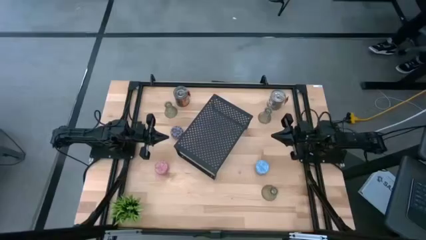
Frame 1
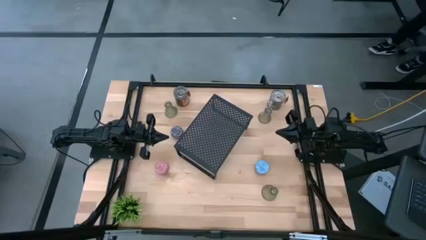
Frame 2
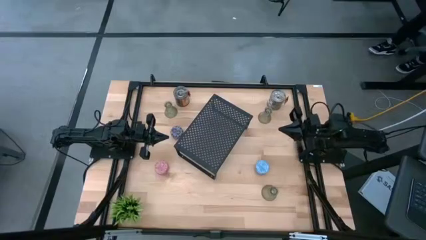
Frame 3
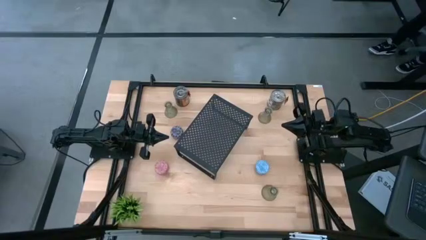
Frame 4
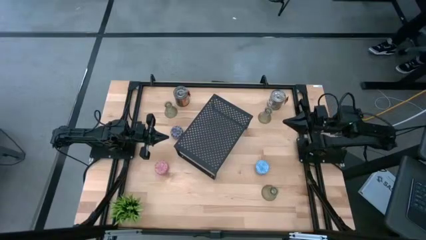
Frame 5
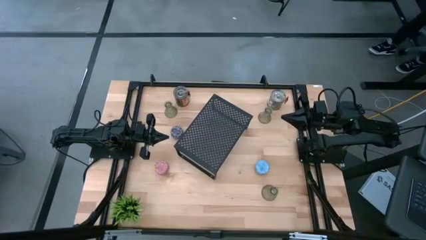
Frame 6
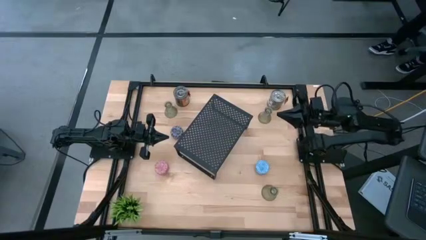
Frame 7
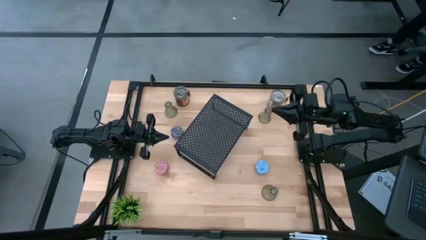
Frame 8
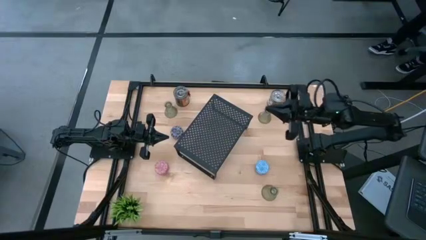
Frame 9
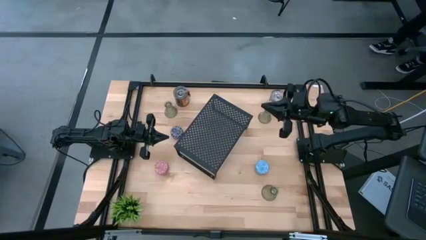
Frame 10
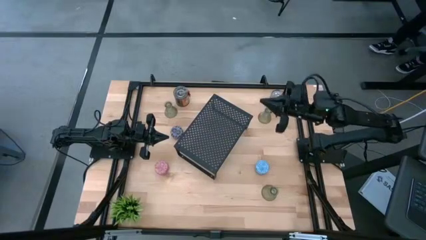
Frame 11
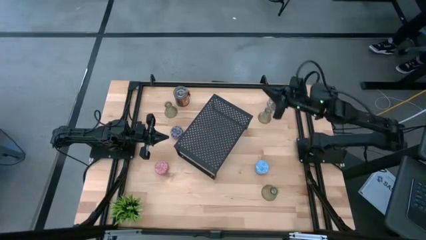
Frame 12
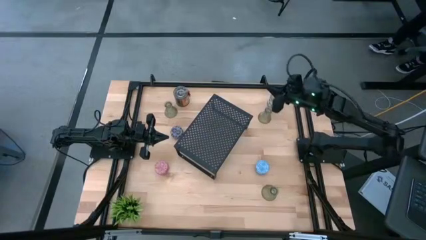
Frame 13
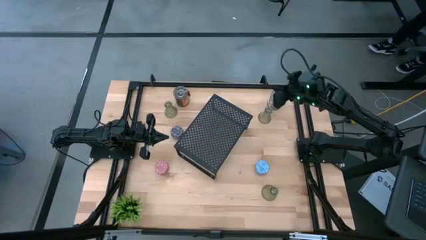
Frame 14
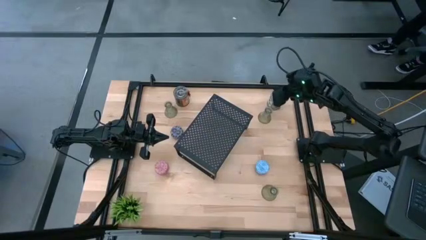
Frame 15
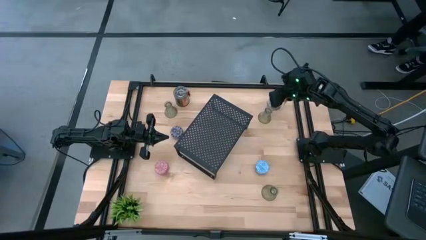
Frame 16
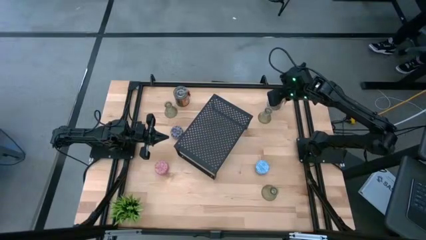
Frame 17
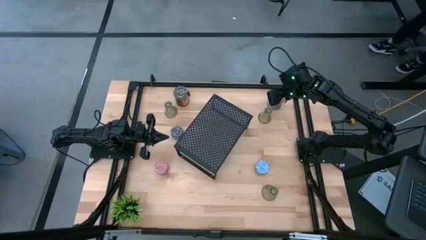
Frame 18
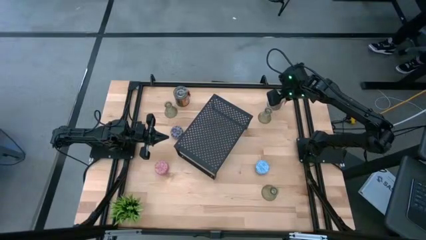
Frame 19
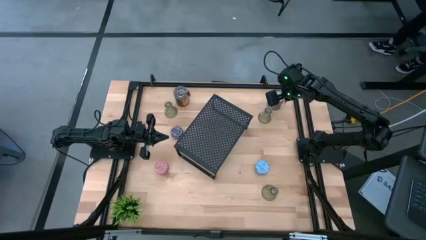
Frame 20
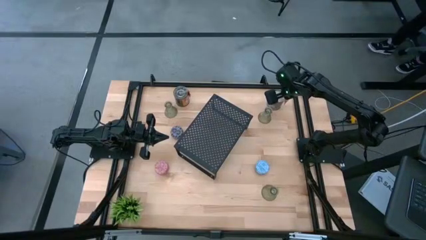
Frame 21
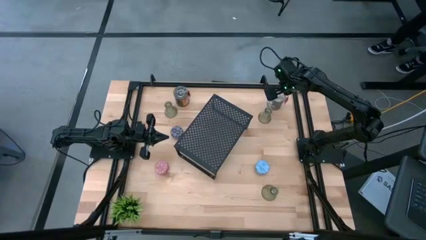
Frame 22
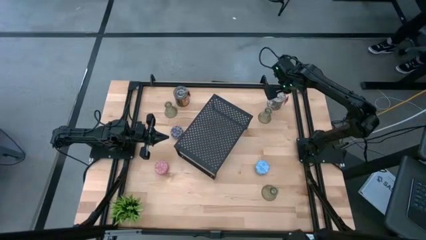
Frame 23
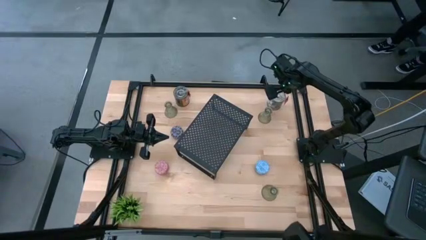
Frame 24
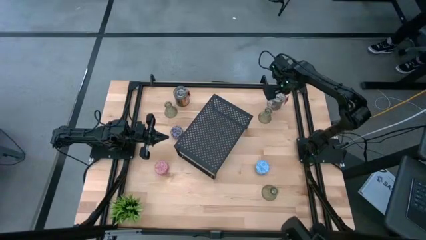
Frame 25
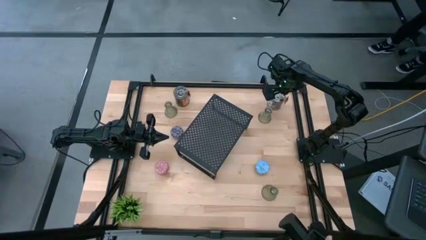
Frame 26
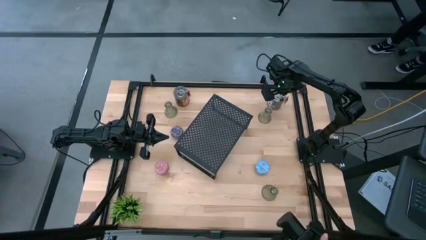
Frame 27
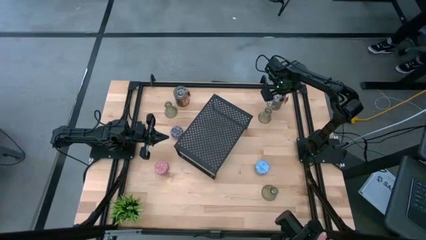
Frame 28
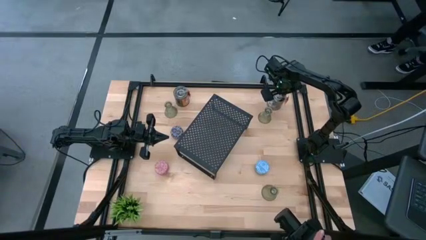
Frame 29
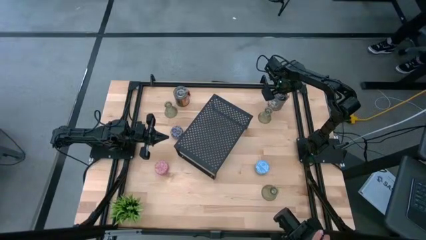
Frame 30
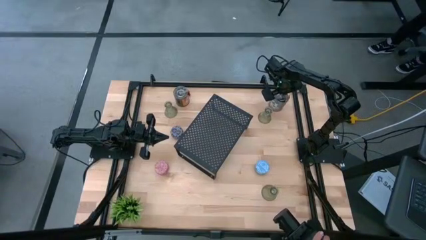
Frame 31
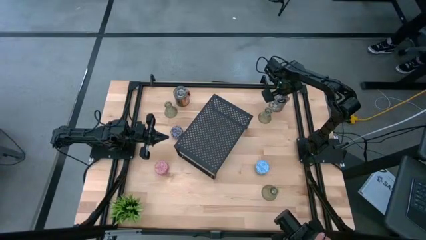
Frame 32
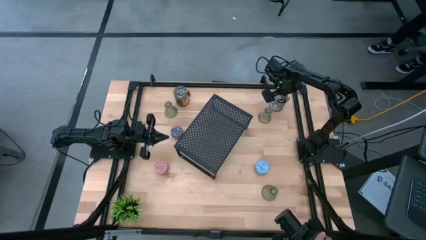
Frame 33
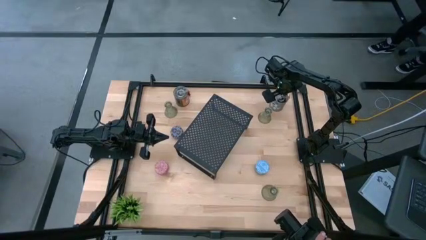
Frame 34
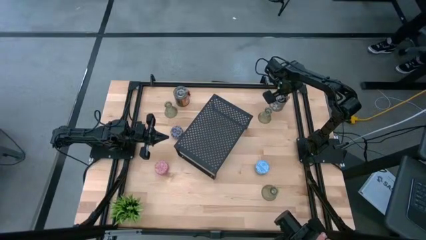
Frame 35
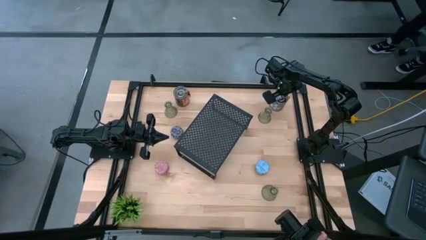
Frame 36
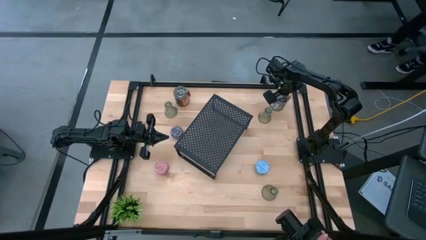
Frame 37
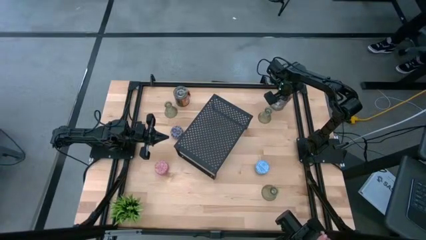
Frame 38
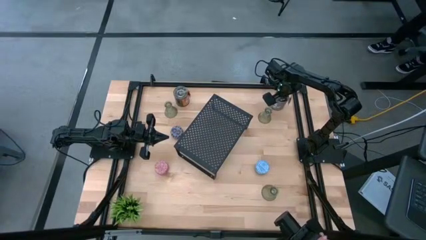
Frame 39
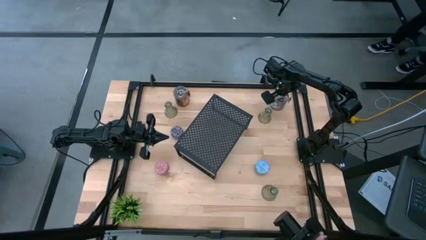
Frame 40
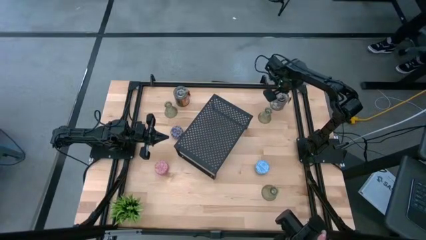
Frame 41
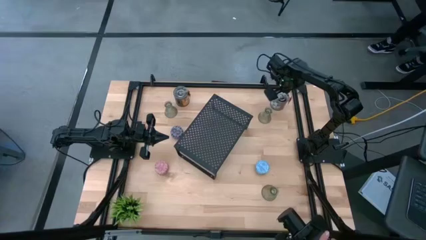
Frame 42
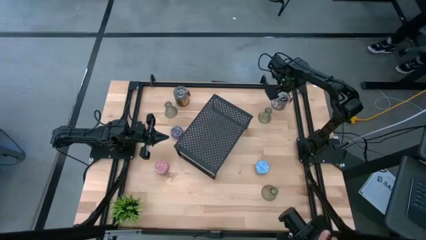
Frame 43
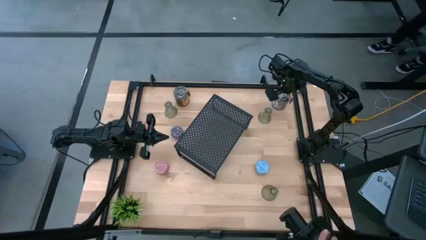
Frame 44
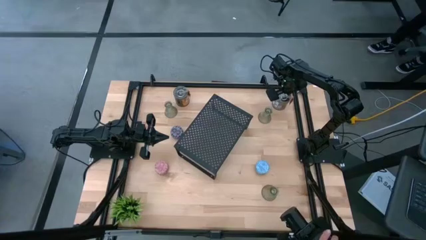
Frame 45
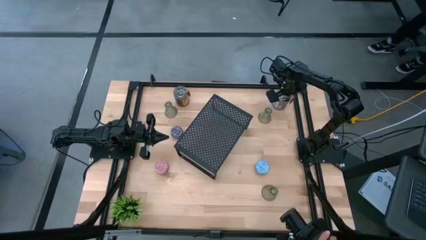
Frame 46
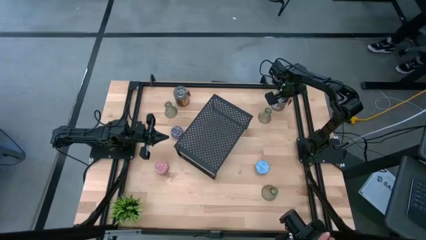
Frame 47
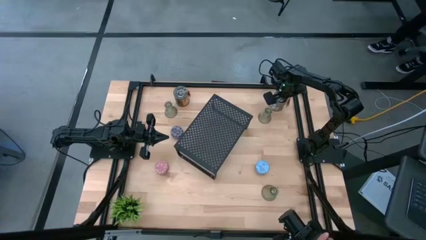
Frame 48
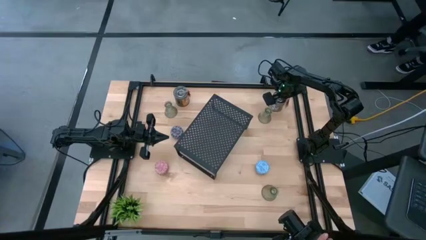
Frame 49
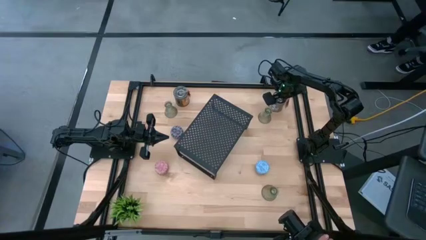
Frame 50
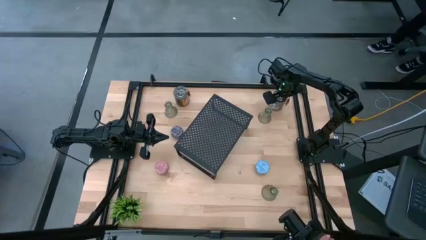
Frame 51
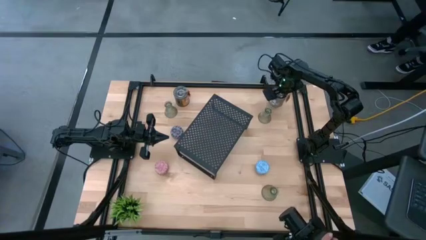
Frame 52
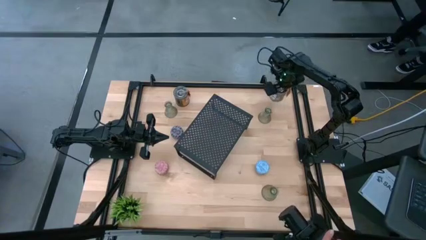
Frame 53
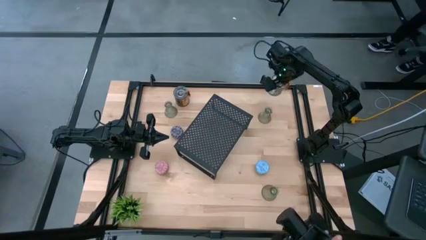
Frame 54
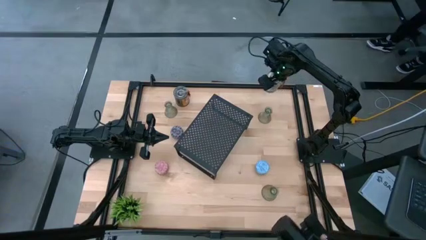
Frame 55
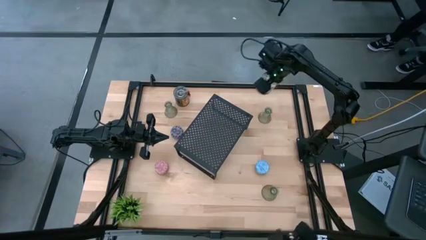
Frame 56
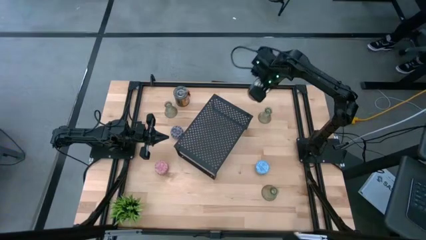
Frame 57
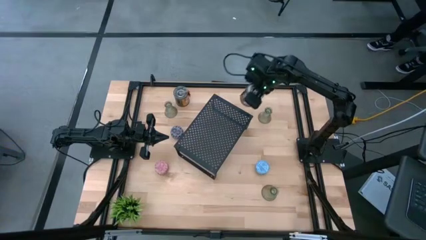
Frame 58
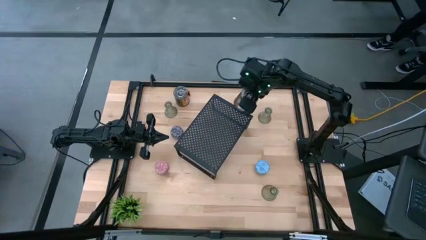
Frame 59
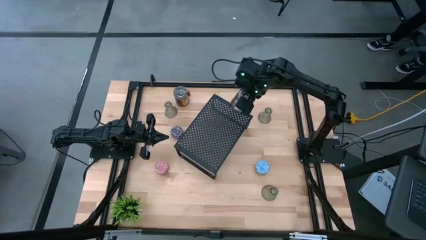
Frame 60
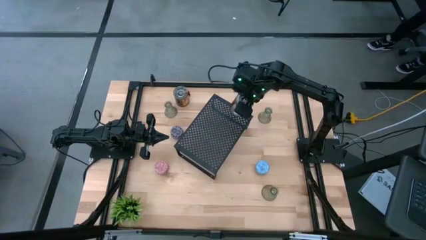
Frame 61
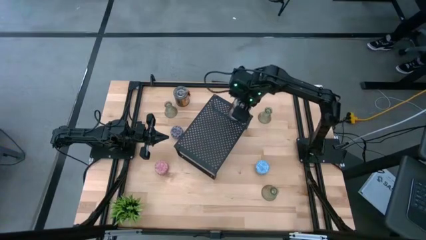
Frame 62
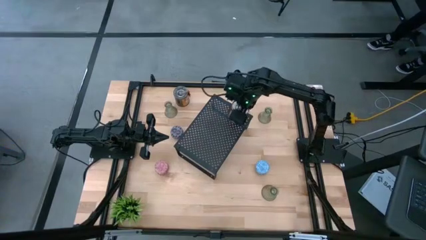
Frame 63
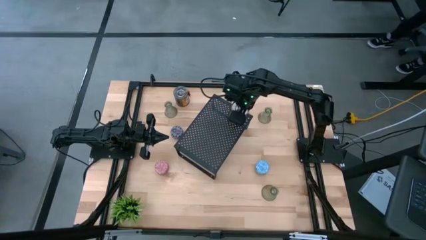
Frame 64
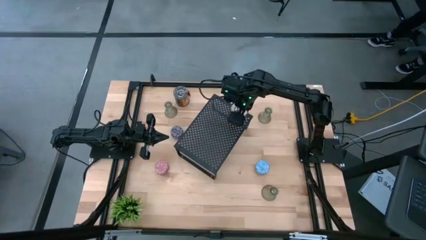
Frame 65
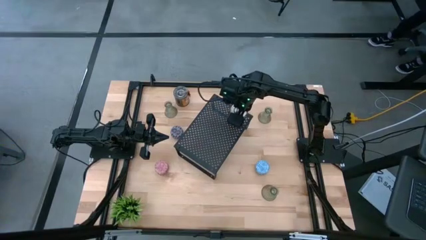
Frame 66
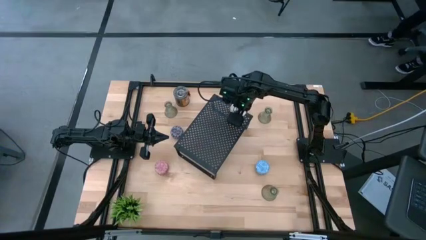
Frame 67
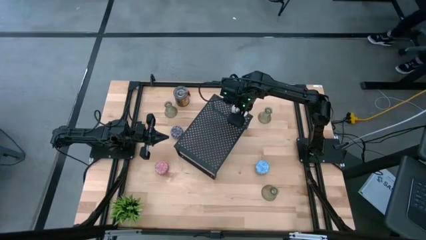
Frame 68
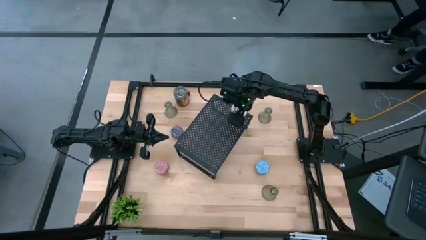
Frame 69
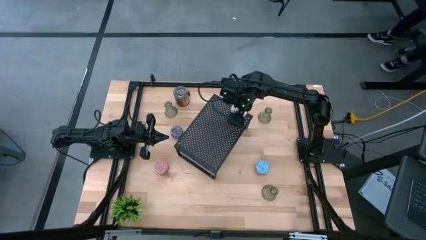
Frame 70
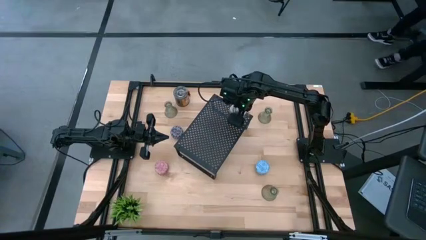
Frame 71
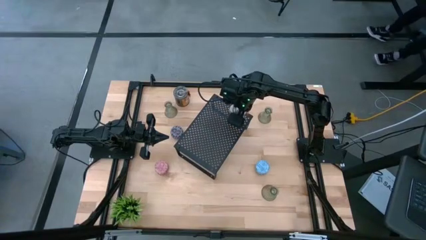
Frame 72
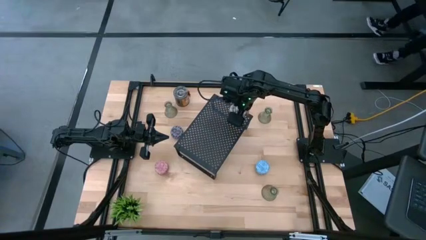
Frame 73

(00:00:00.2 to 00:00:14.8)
Task: Pick & Place candle stick holders
Put the right scented candle on the shelf
